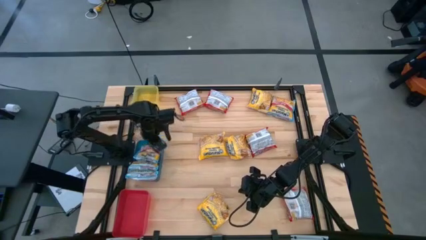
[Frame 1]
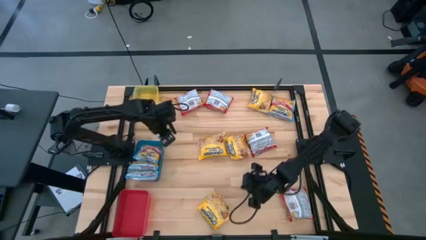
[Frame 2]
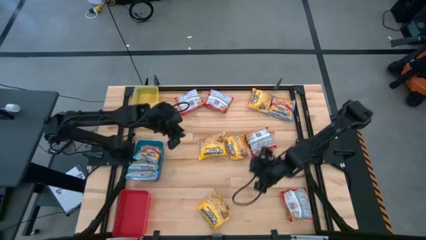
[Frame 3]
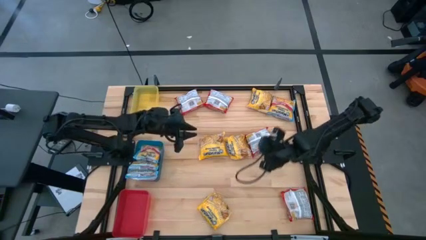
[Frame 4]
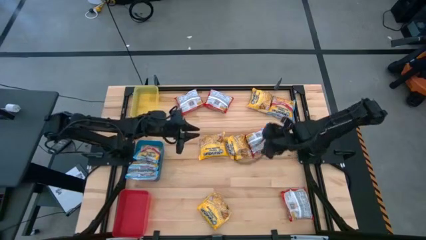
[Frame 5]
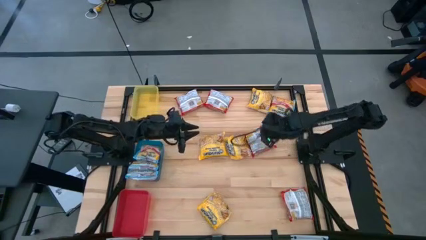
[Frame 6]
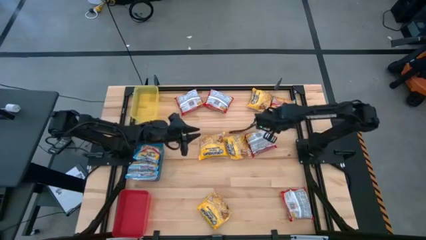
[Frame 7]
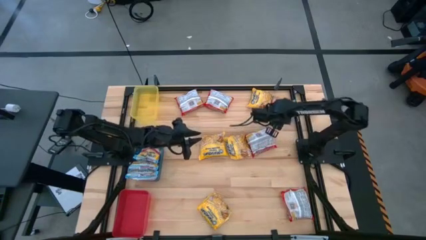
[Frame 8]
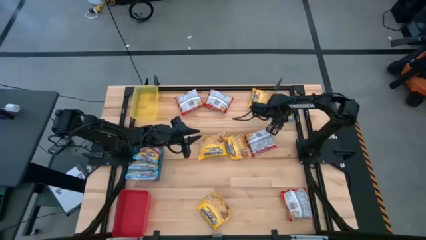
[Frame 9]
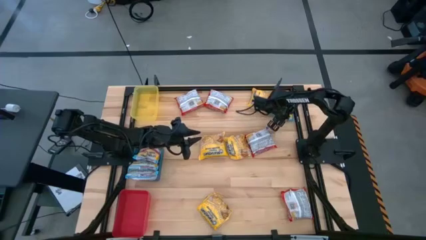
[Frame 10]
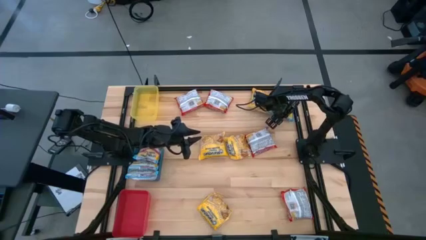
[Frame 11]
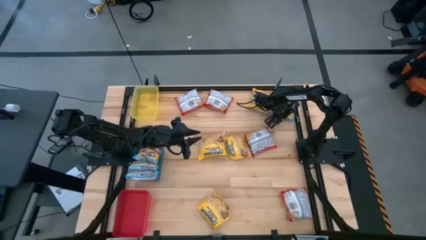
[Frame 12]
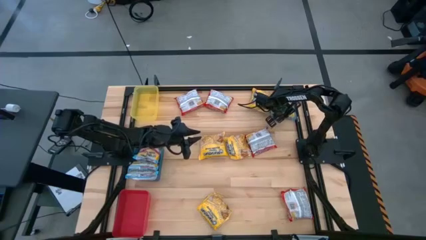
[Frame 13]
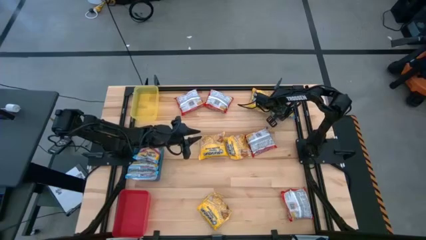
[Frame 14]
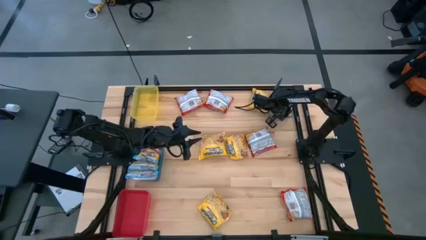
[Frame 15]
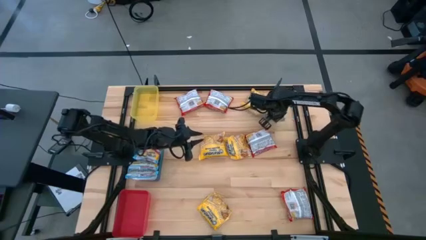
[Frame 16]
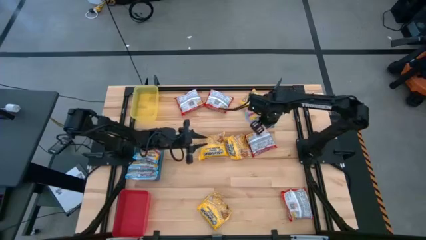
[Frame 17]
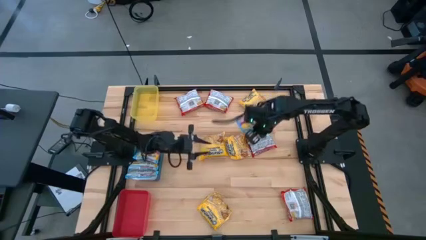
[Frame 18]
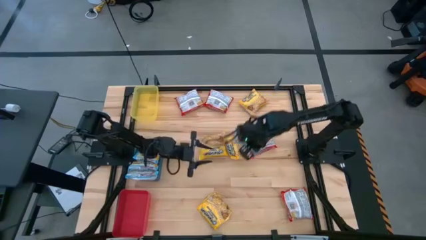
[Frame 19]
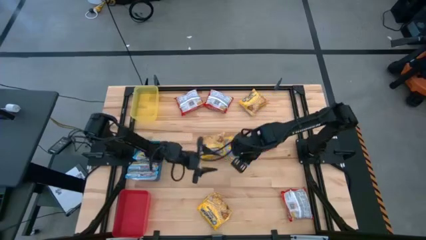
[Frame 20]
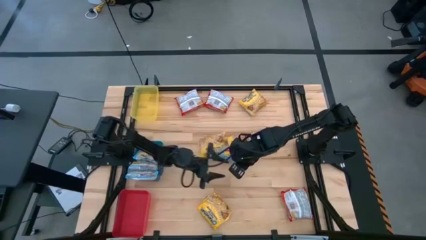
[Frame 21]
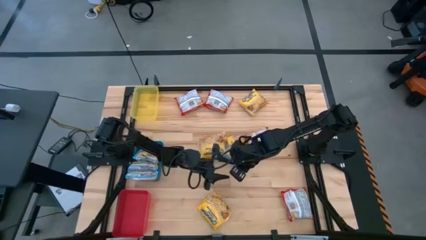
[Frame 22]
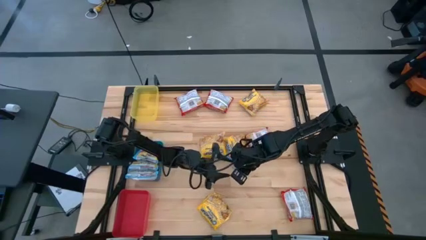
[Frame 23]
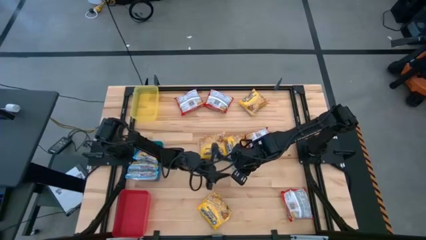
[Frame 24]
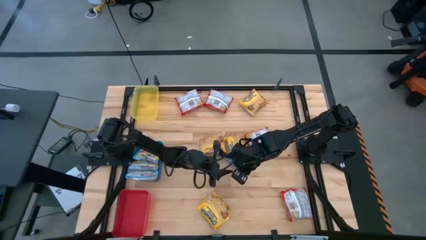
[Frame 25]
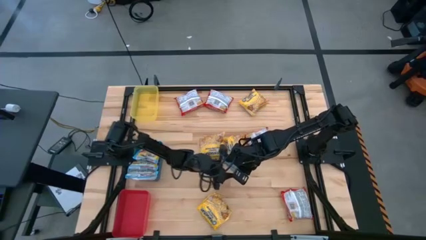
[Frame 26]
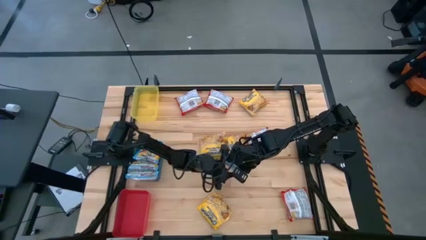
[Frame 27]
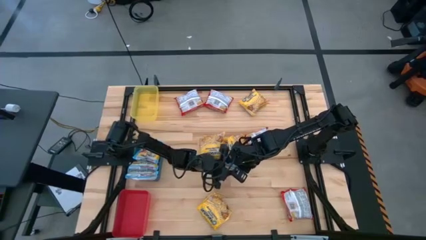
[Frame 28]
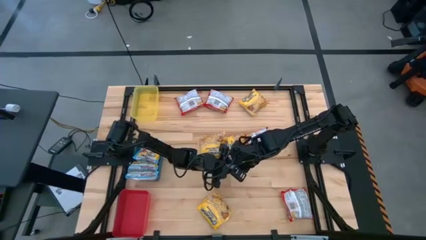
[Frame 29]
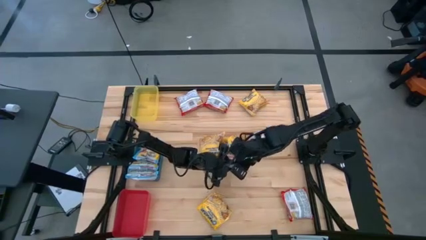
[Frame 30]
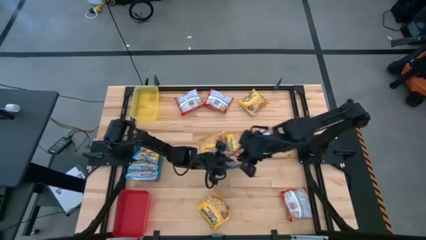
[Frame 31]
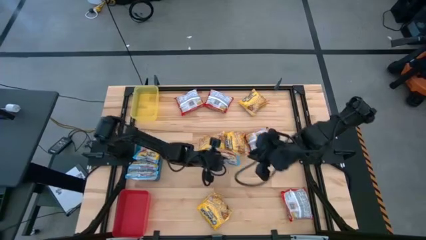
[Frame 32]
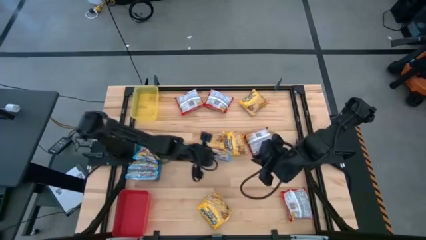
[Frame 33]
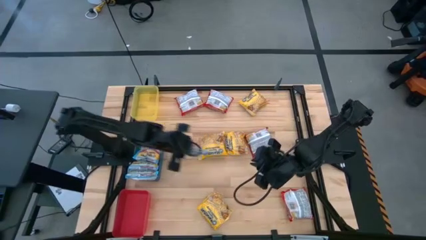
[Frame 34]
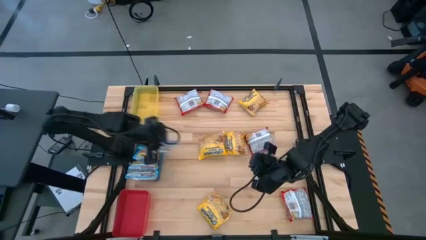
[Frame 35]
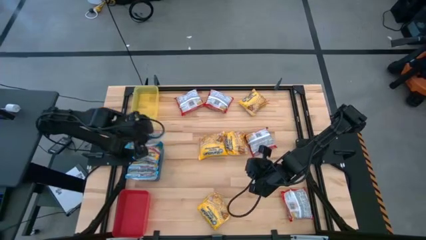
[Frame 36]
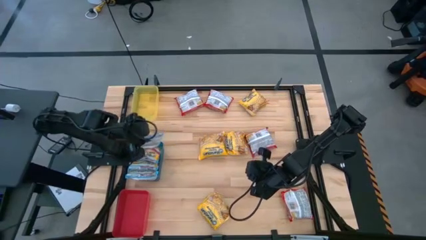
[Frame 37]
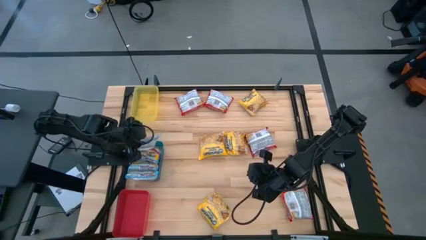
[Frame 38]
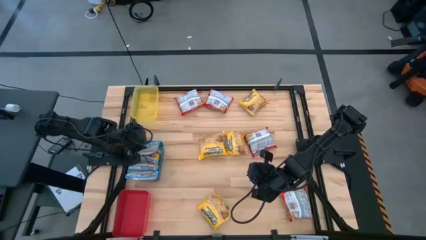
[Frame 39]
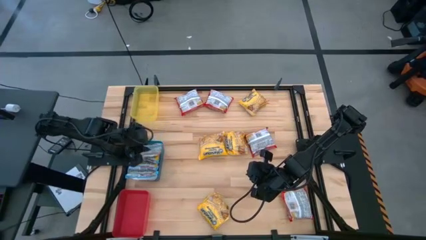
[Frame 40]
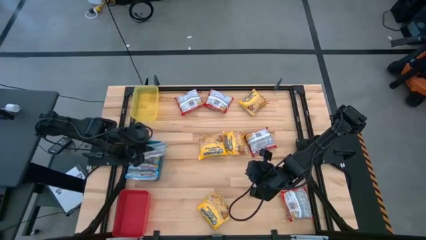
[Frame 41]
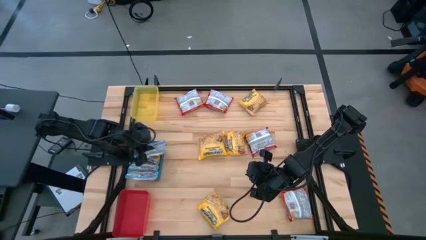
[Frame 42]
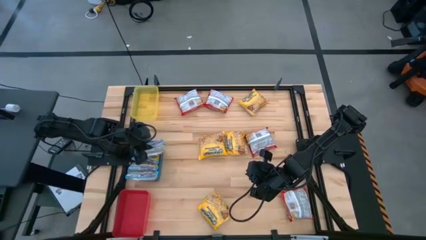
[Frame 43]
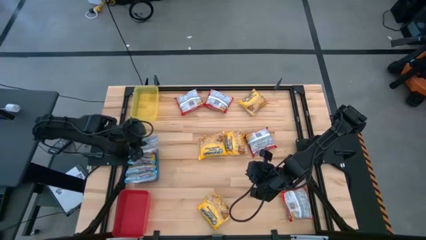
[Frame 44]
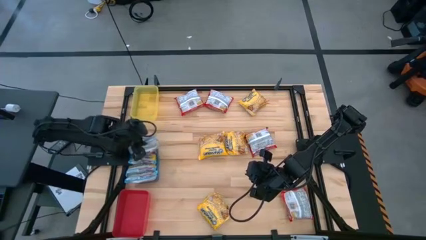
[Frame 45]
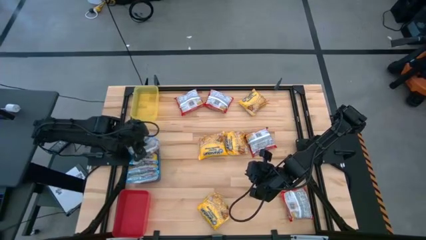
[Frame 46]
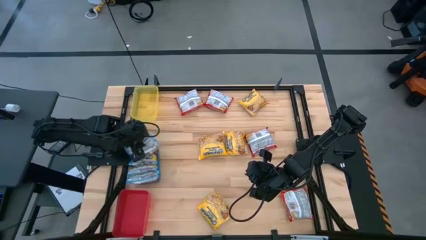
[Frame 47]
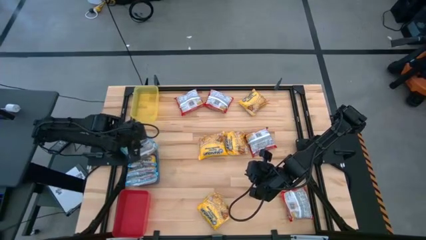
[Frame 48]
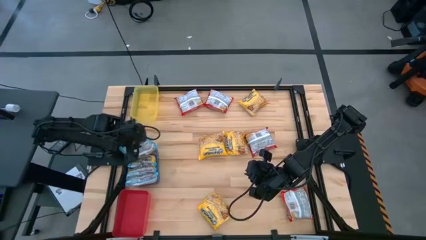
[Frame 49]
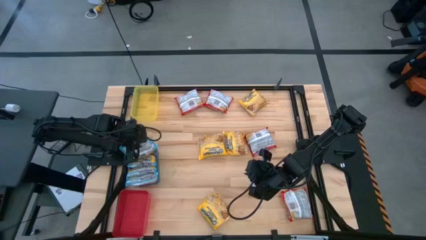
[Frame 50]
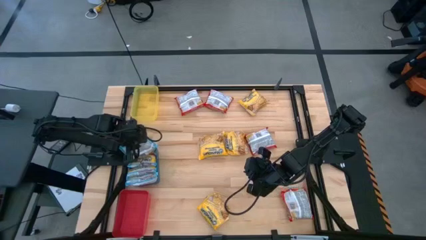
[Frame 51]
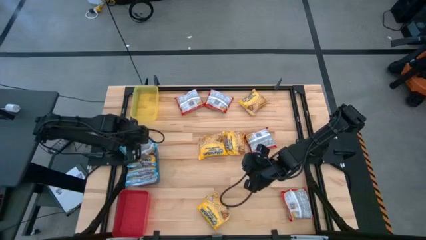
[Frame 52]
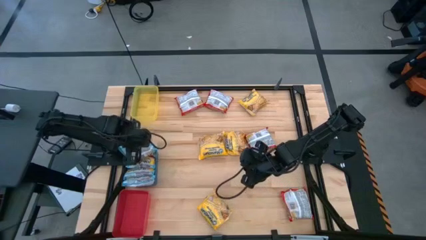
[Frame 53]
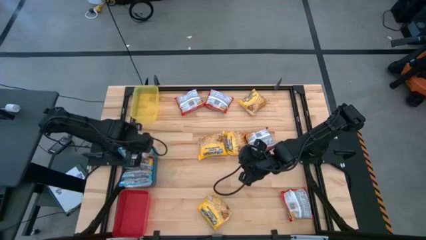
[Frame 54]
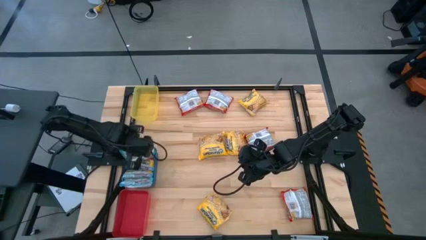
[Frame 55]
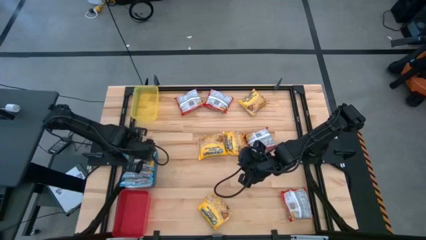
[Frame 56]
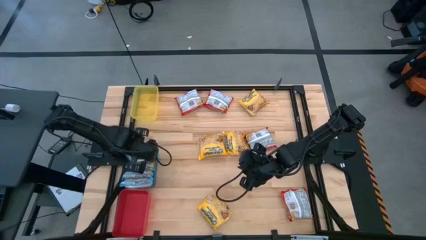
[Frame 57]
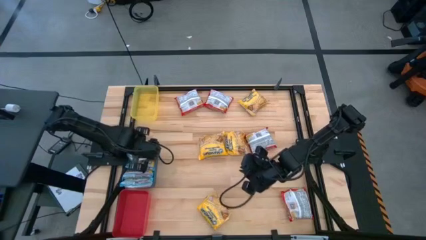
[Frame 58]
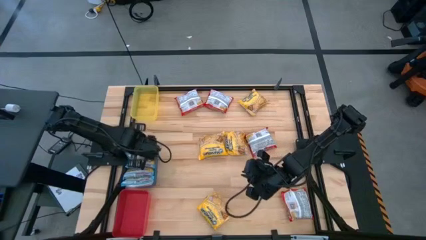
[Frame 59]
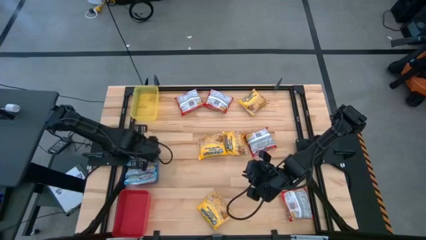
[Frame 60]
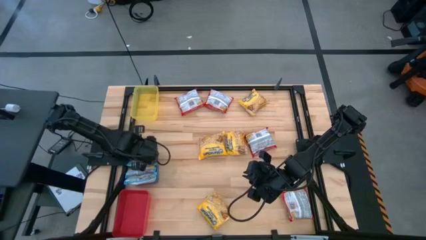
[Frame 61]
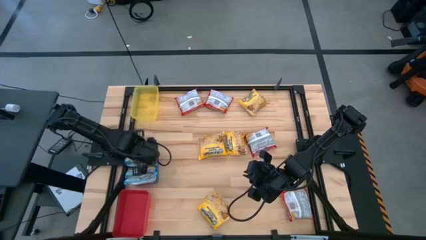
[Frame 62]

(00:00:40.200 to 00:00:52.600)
Task: Sort Maruchan noodles
Put the blue noodle pack into the blue bin

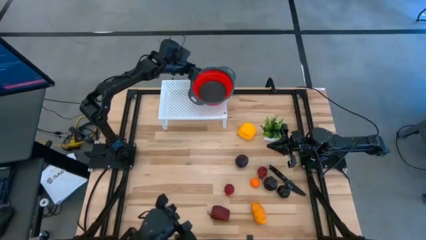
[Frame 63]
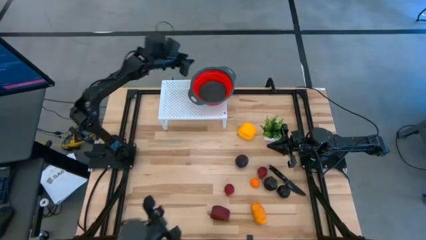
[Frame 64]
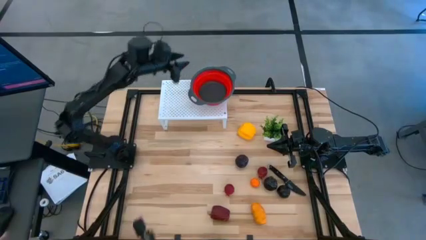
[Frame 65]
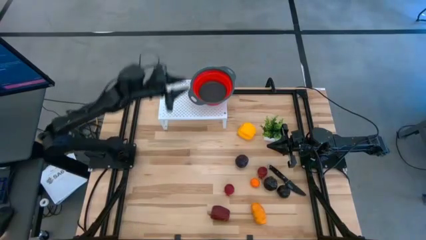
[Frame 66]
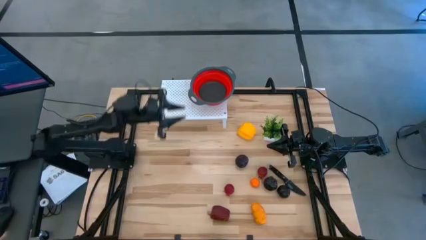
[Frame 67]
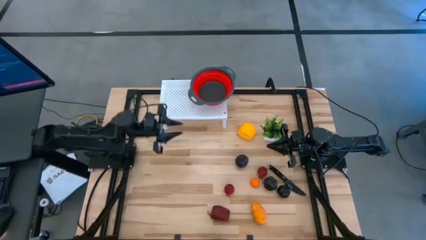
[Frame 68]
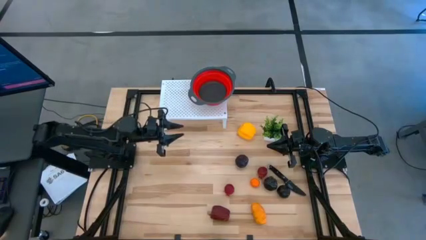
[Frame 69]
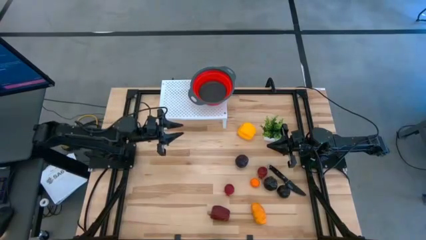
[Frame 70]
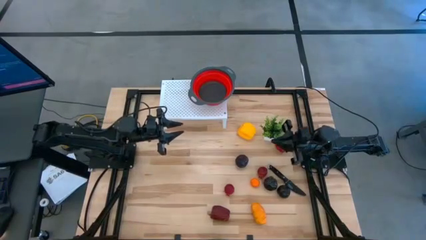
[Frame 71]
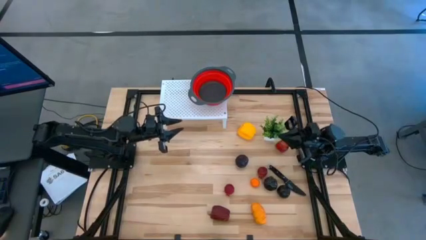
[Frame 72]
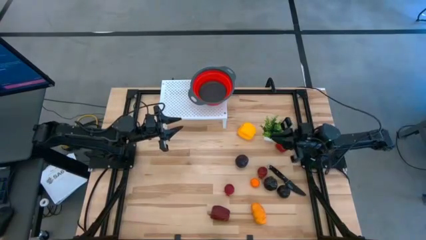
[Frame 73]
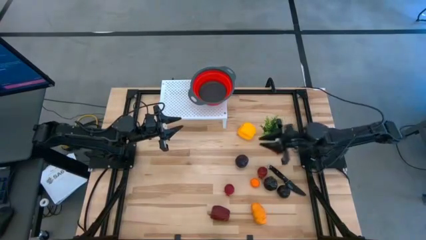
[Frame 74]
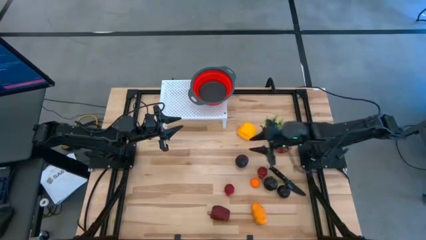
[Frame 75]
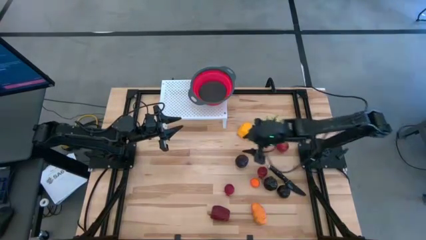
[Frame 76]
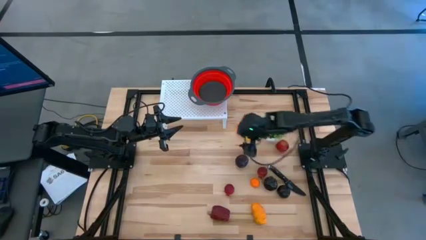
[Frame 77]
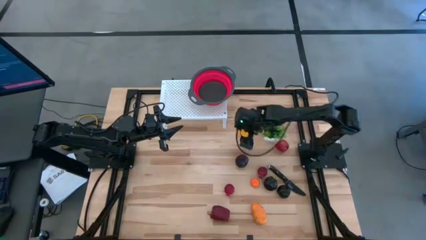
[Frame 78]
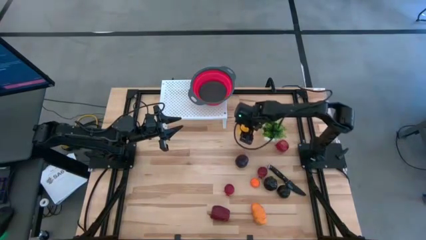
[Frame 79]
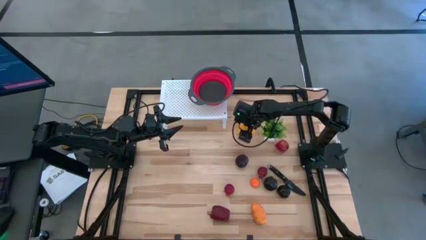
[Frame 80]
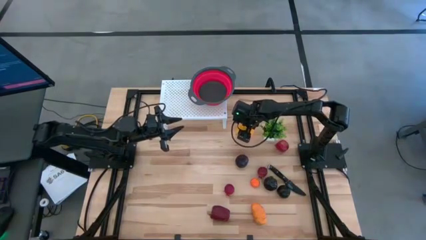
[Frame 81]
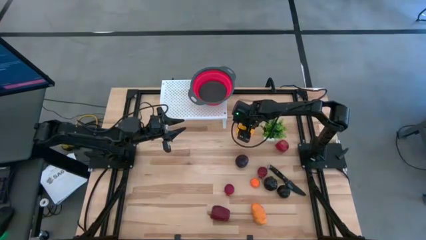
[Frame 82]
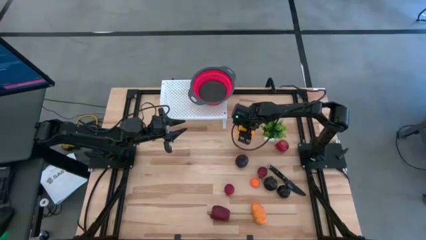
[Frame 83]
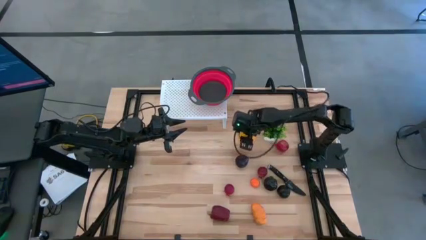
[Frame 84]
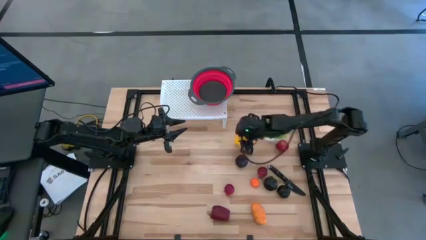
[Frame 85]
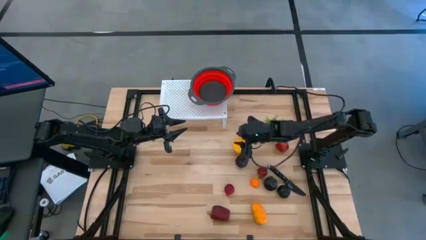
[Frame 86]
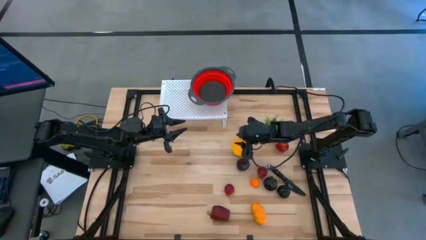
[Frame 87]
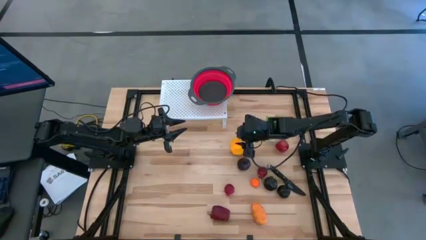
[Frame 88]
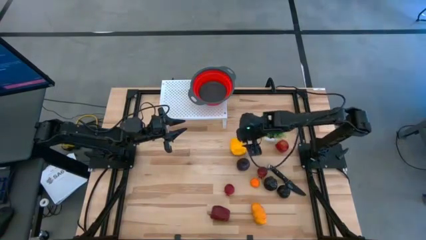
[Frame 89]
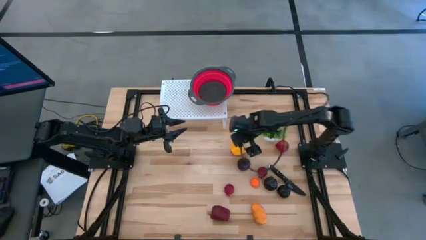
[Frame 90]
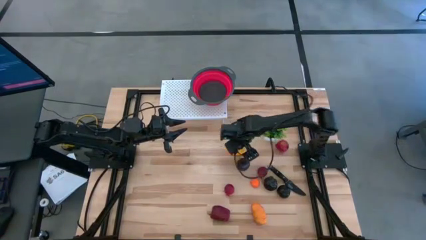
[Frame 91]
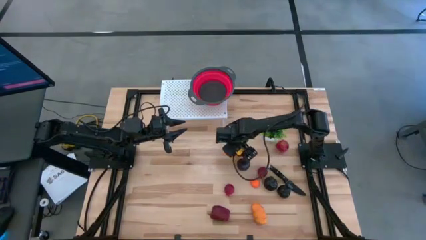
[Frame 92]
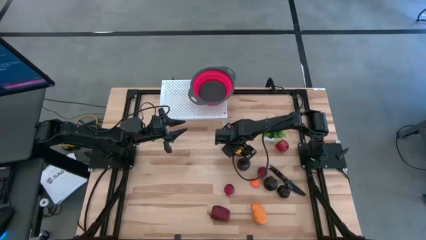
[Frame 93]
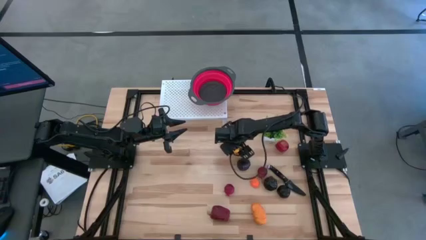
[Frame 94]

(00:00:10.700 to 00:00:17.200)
Task: Pick & Place Fruit
Put the yellow bell pepper into the red strainer bowl on the shelf
